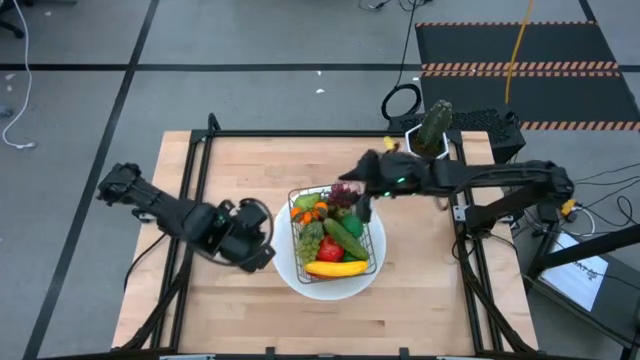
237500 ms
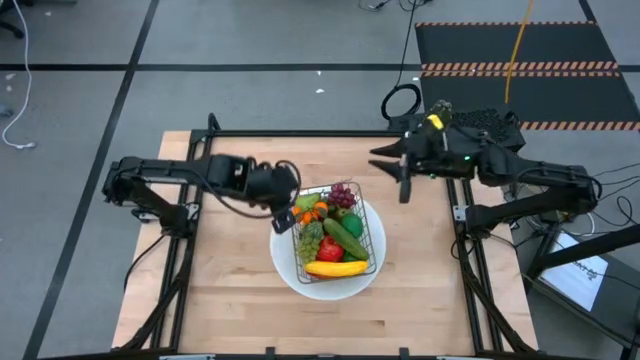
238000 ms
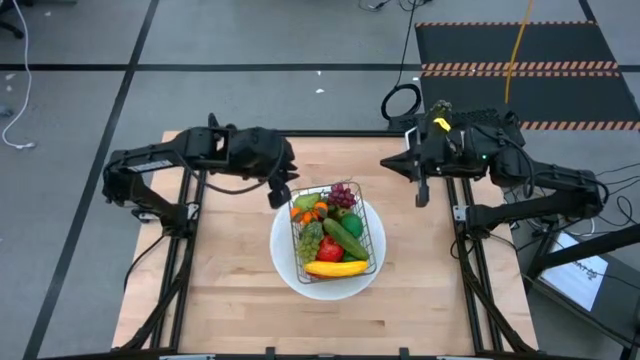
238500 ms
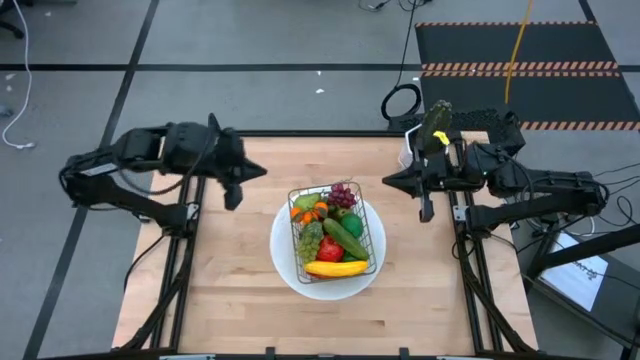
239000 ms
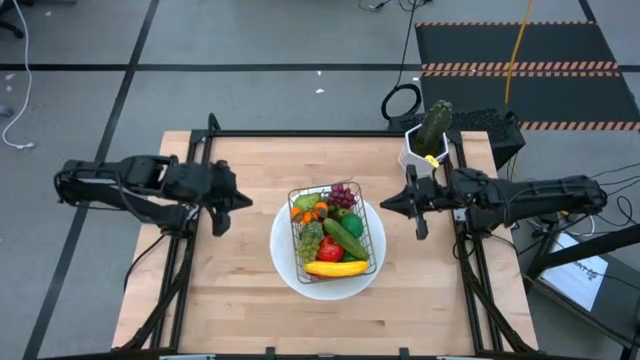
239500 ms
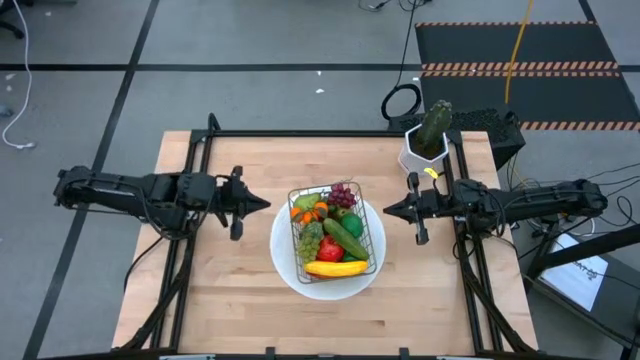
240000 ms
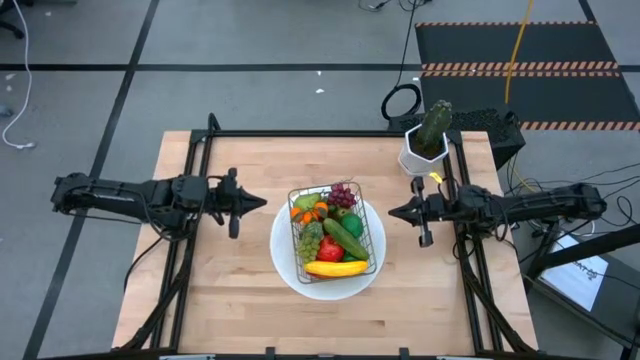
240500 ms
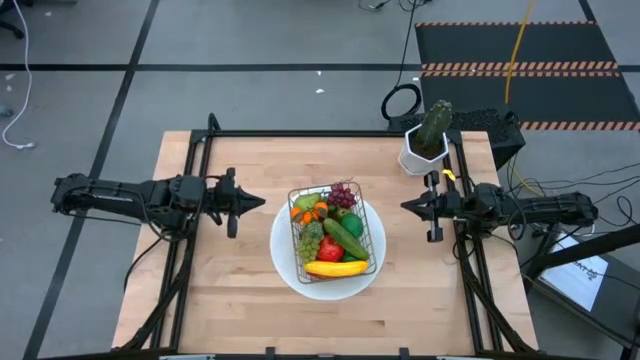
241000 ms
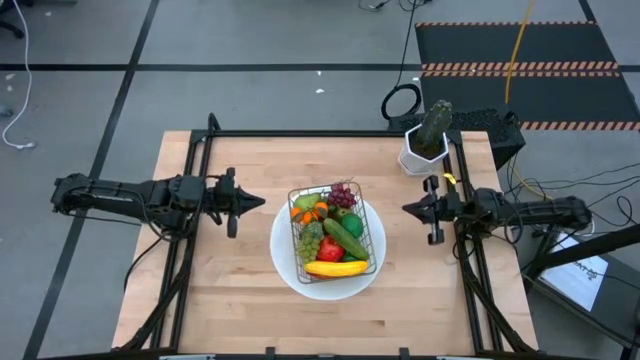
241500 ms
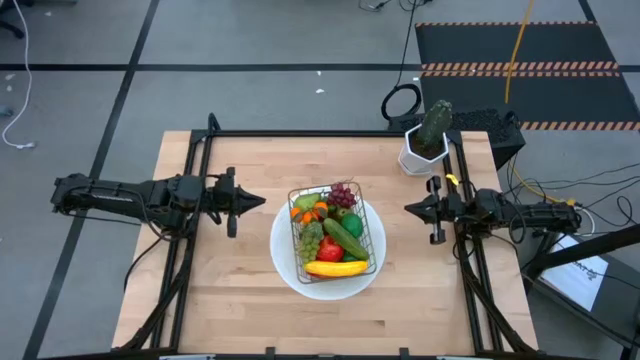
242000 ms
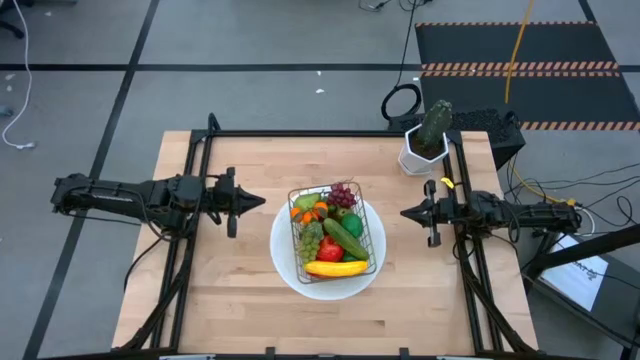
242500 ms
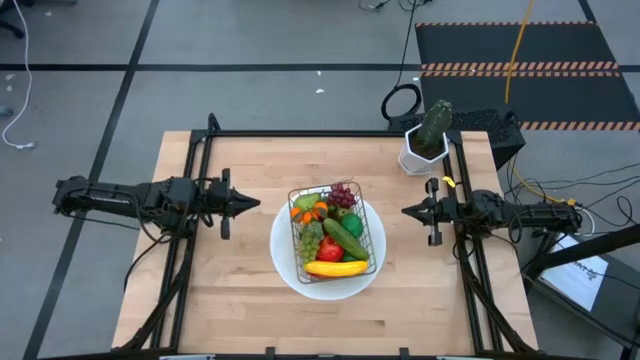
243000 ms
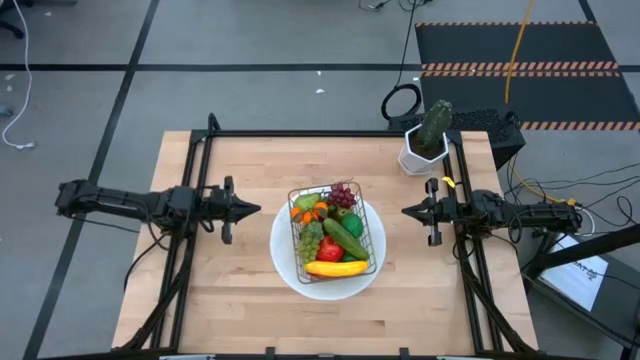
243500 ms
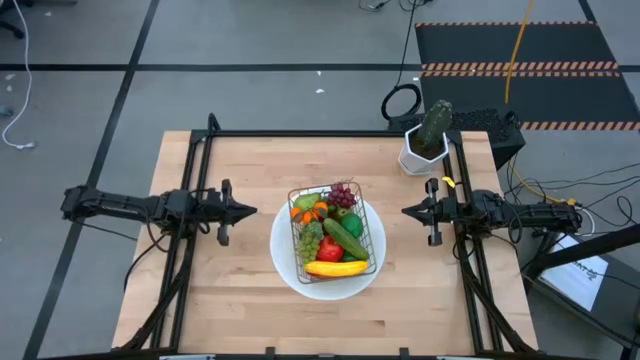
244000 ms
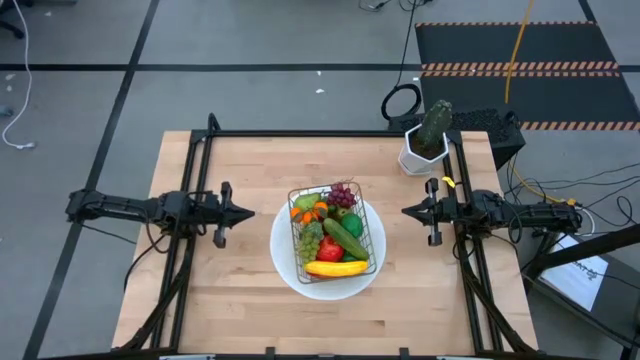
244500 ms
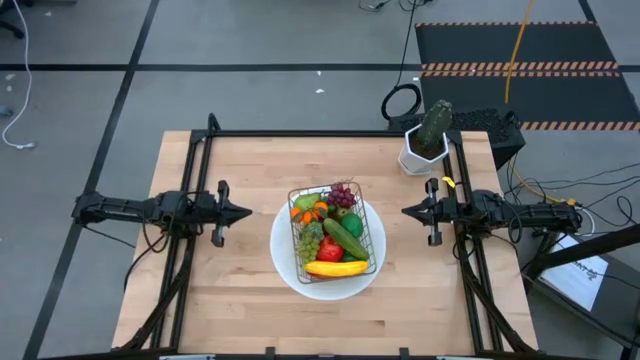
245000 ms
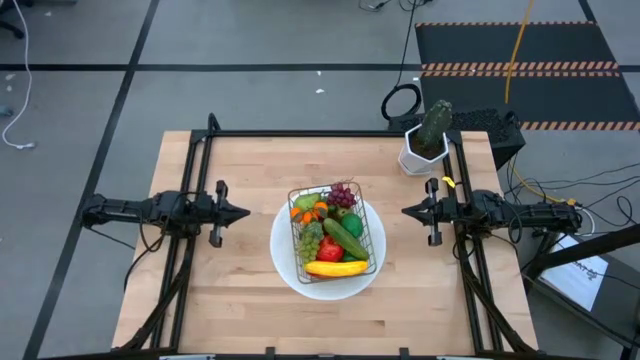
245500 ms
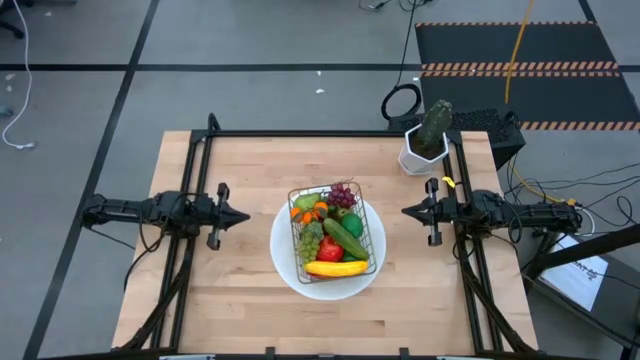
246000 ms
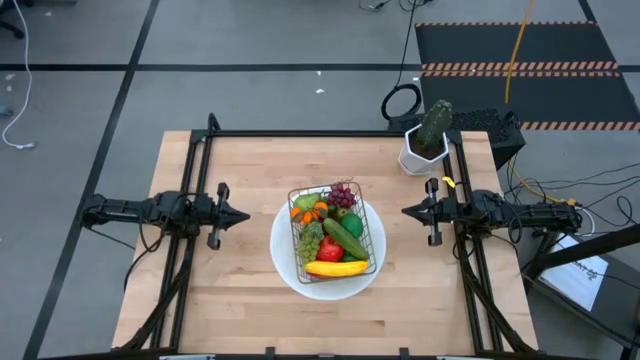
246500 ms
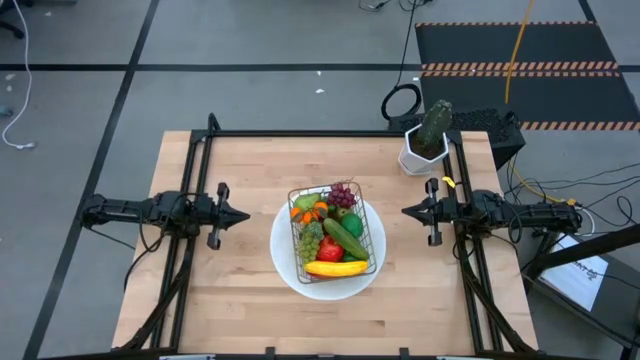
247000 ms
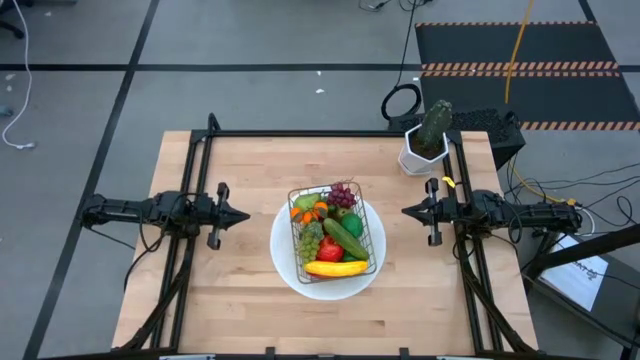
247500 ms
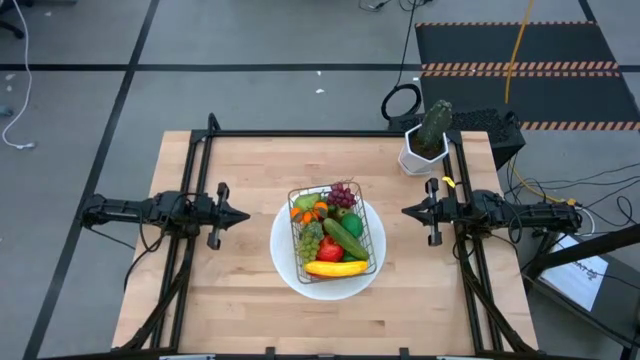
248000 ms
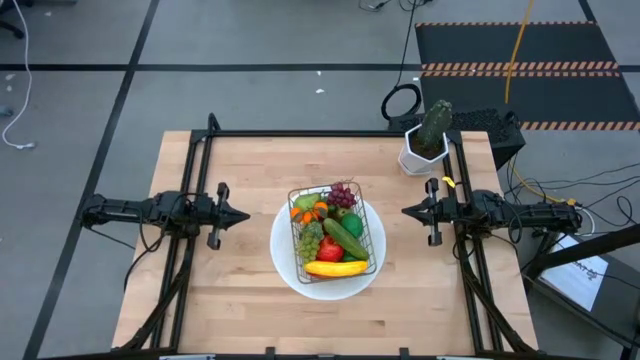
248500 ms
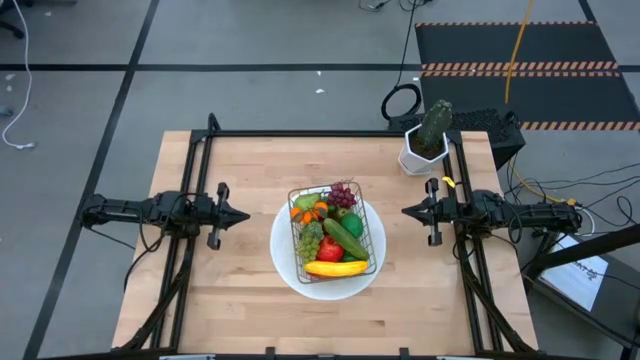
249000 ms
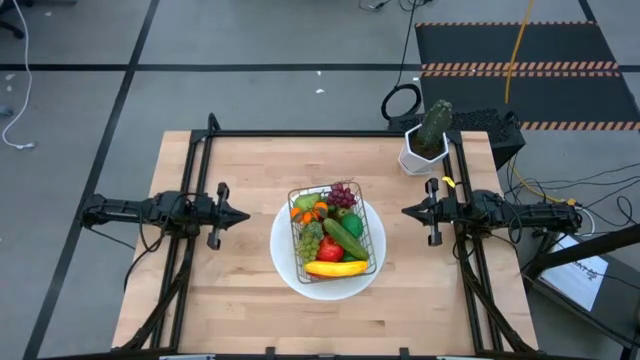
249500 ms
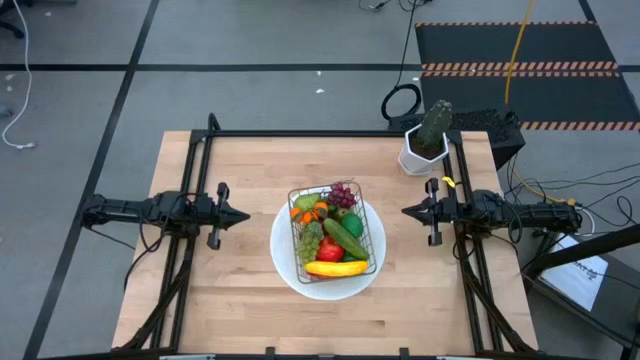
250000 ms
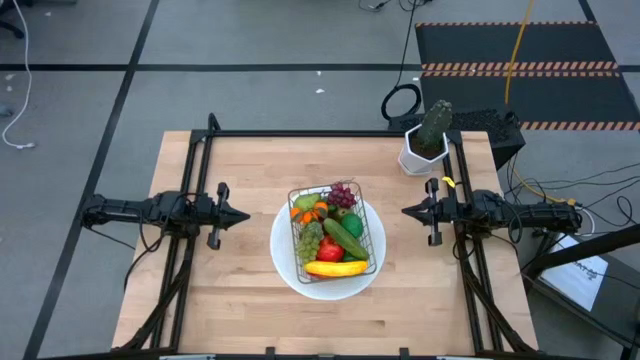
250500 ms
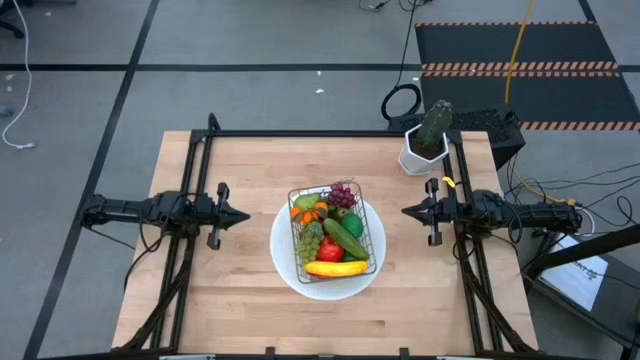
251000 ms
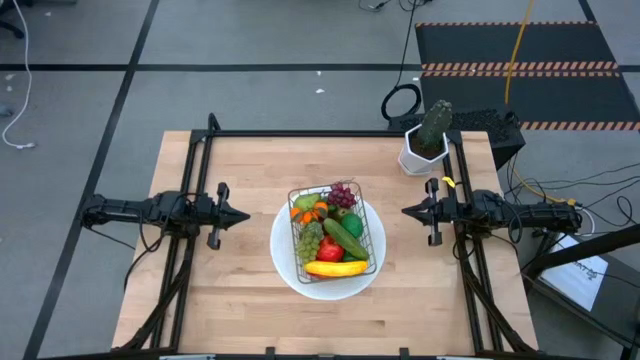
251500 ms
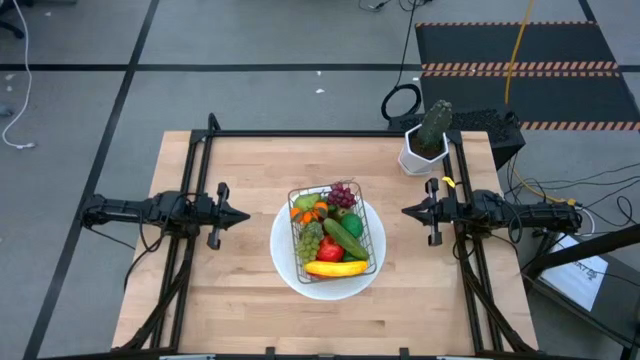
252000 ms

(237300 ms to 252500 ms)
Task: Build produce basket
Return to Home Position

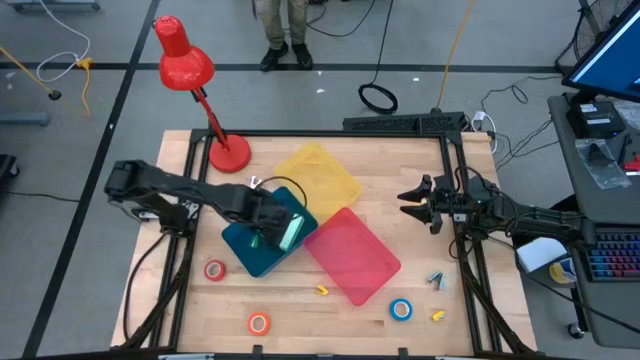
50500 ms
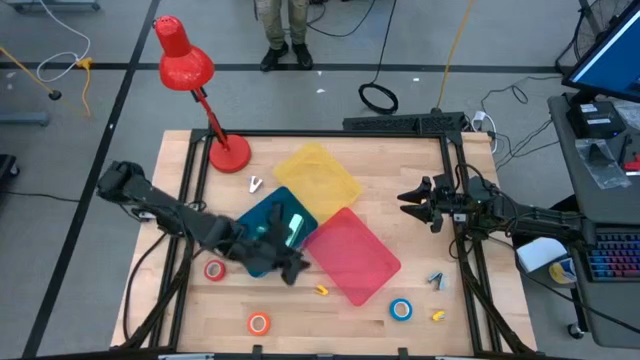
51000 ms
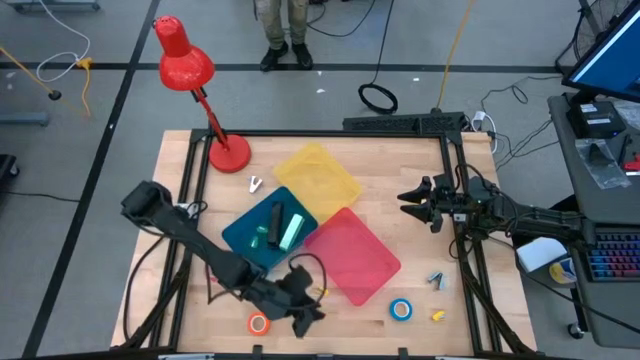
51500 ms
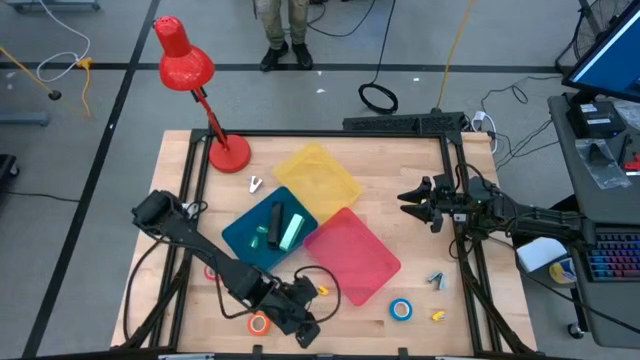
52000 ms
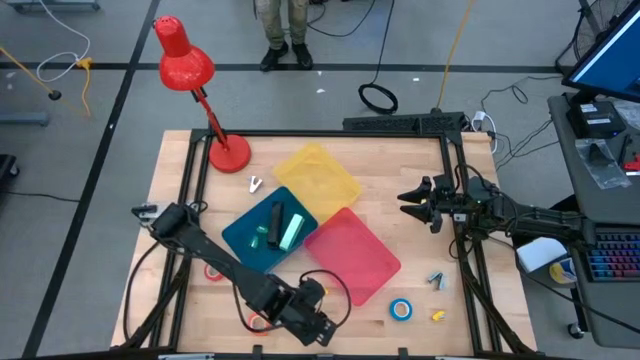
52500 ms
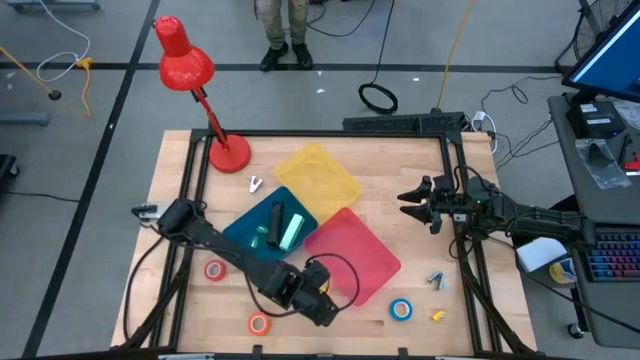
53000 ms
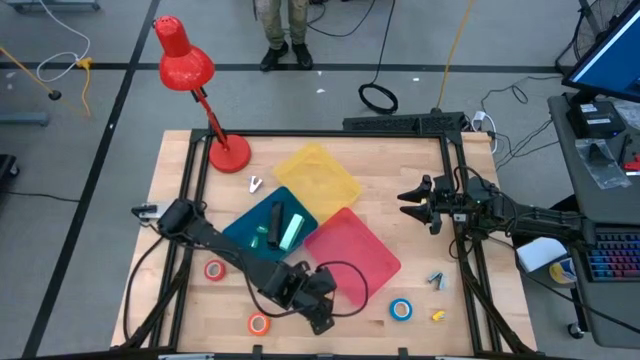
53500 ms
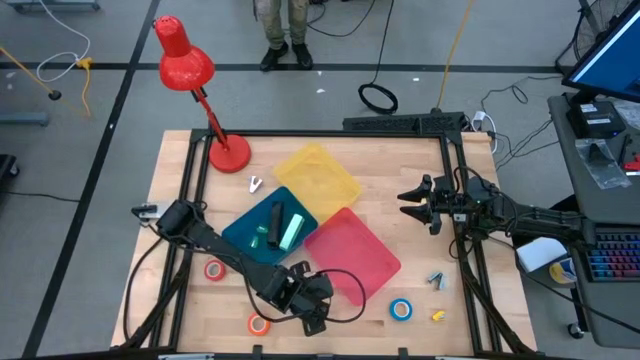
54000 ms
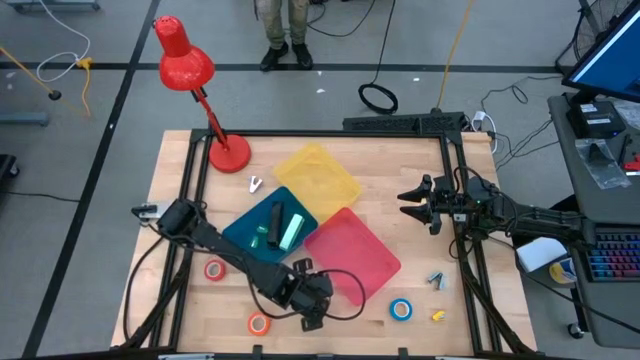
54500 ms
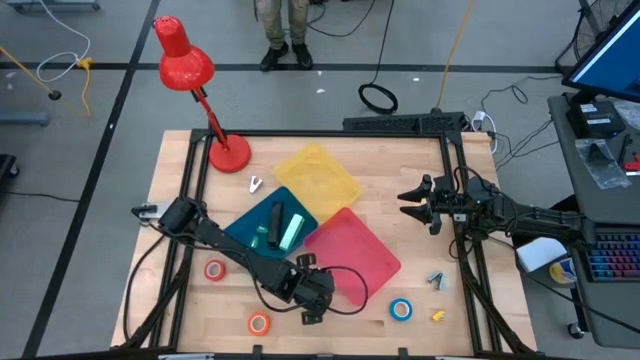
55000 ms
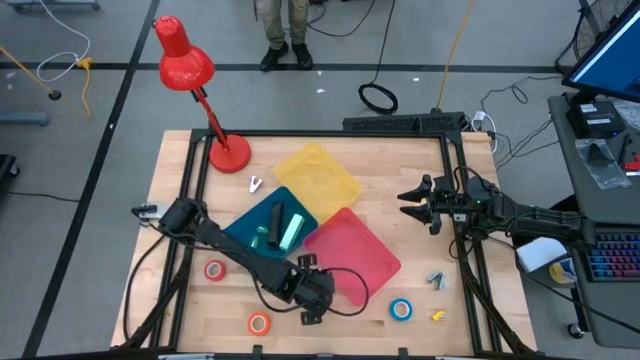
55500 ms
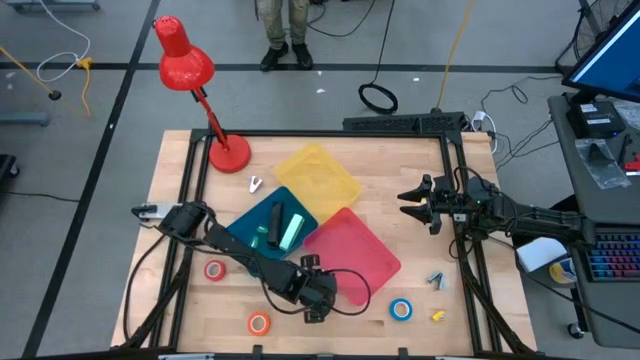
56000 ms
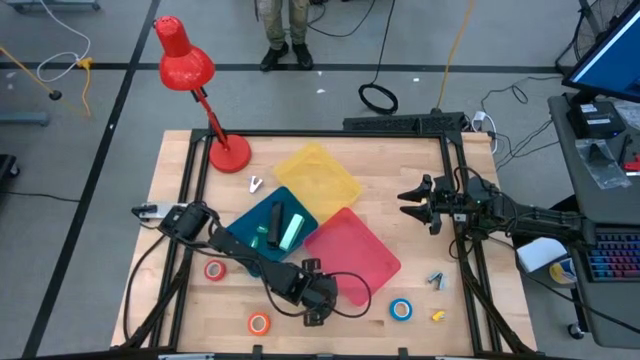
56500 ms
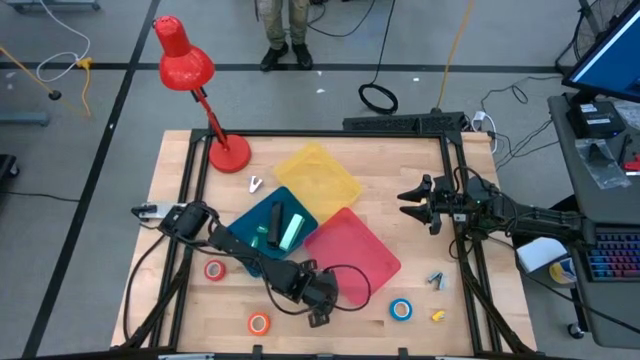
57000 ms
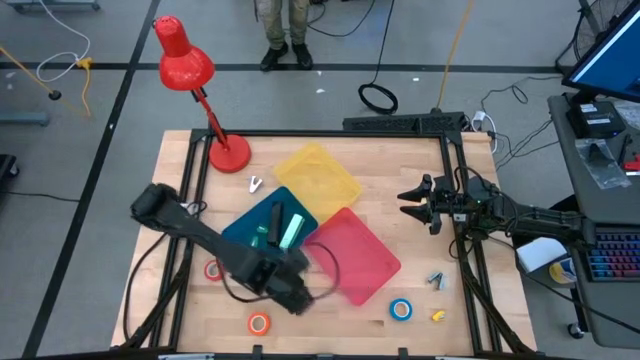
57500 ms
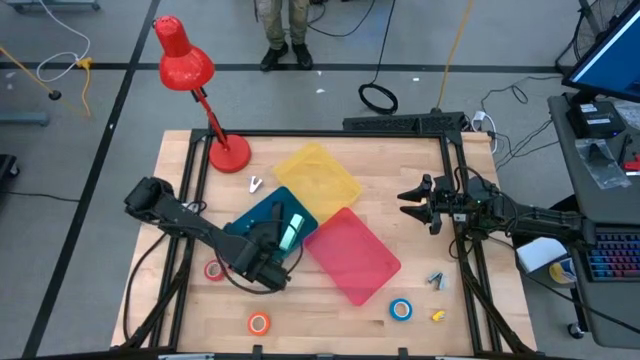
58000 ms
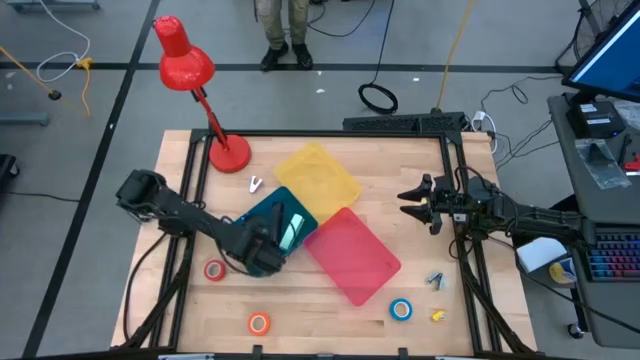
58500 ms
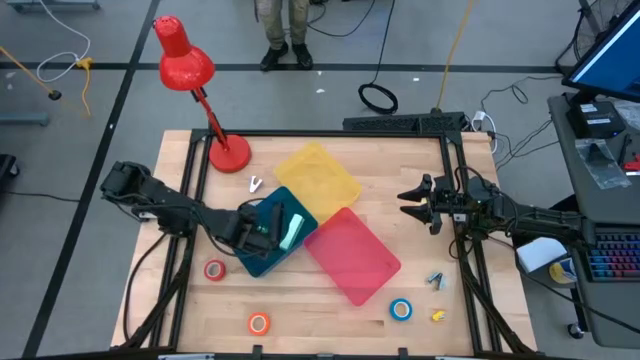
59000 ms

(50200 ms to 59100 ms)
Task: Pick and place Stapler, Stapler remover, tape
Put the left yellow stapler into the blue bin
